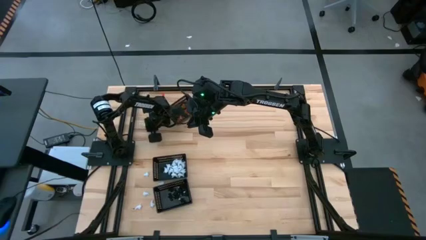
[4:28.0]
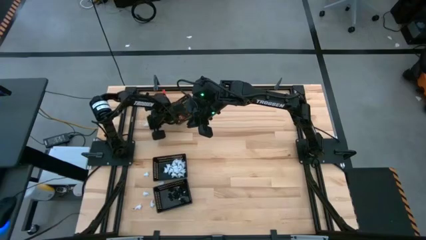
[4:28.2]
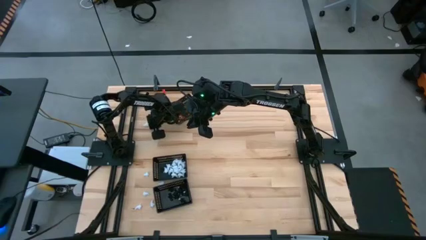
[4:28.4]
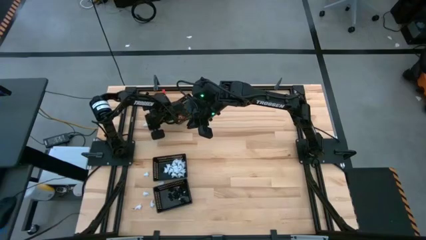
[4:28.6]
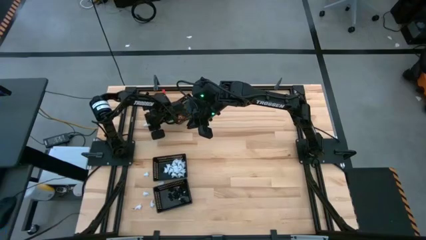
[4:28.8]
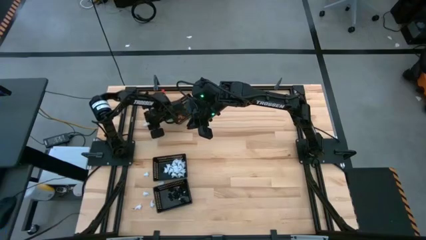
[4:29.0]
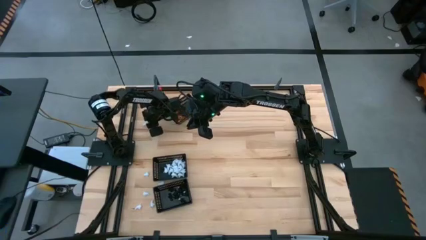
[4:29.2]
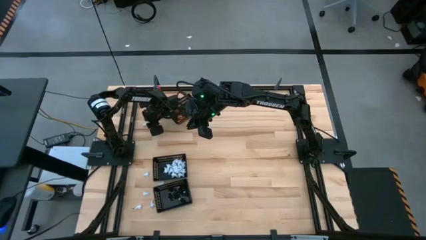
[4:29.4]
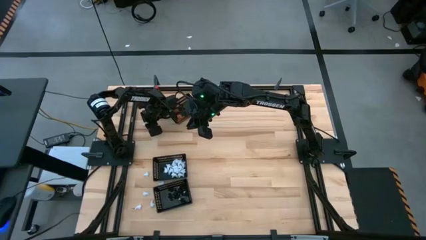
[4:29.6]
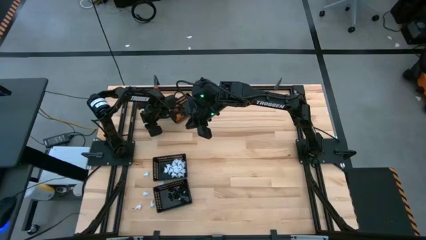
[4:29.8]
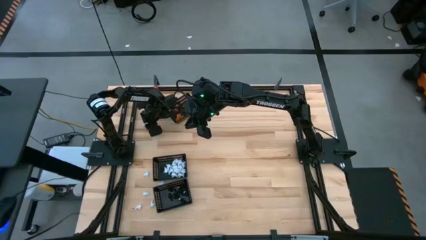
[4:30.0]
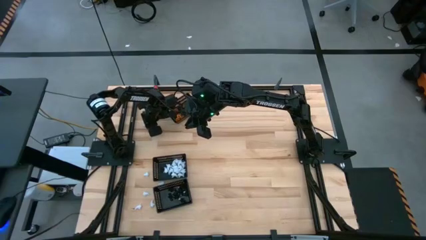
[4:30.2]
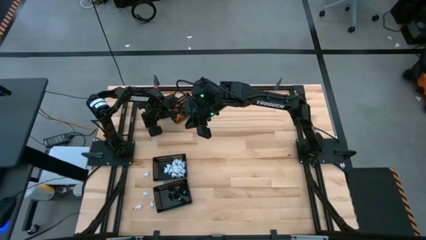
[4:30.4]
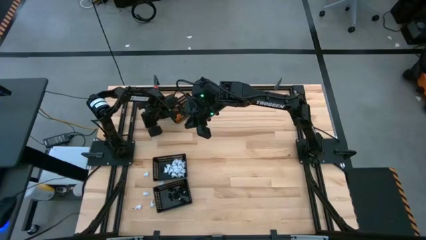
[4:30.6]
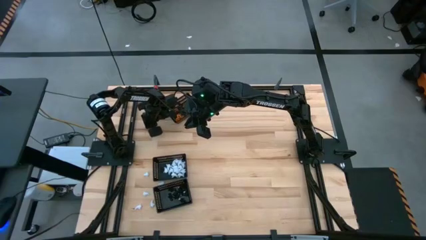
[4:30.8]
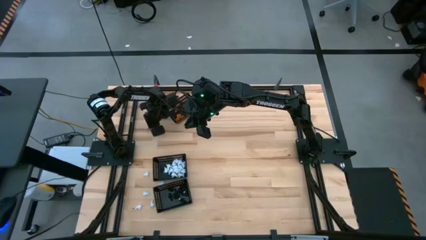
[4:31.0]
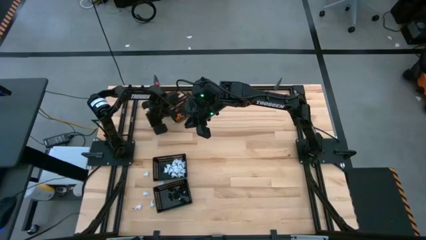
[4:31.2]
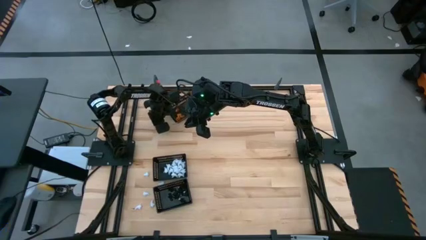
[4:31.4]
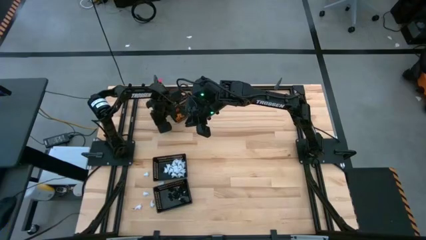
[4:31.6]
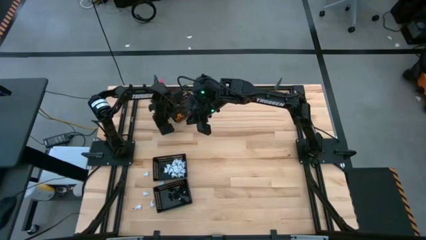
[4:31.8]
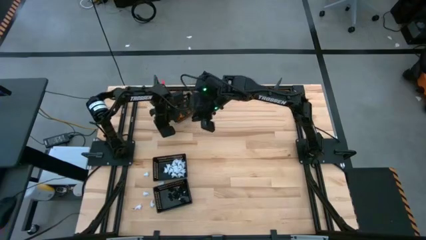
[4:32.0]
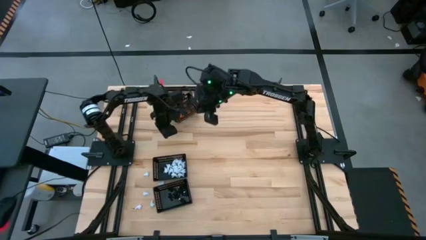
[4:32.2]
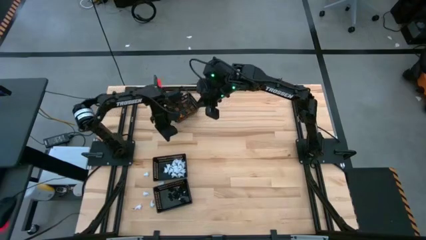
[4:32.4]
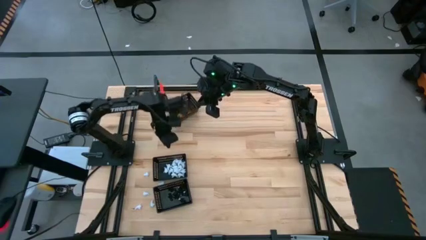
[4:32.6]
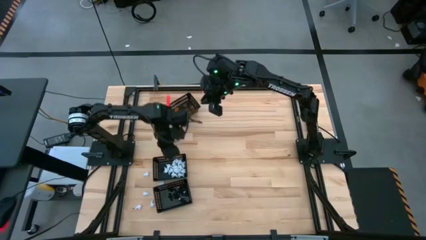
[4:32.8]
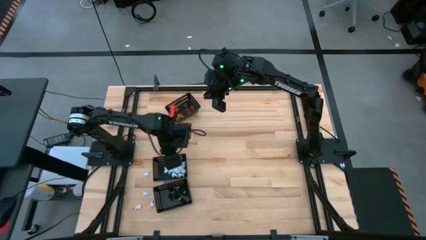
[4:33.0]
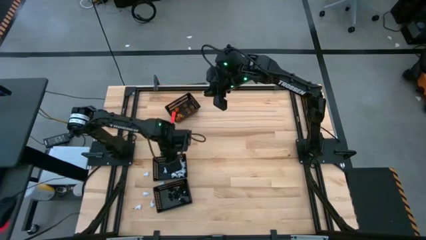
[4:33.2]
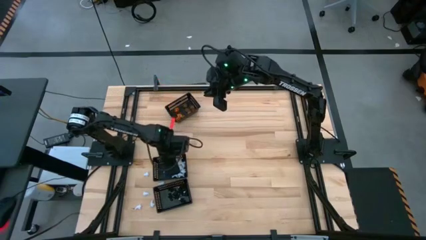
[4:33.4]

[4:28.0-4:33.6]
Task: Sort Halloween decoration
Put the white toy into the middle black bin

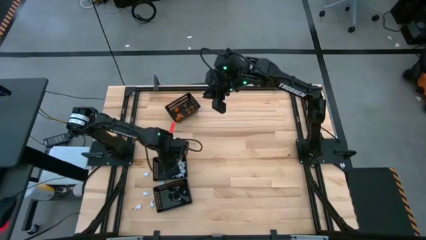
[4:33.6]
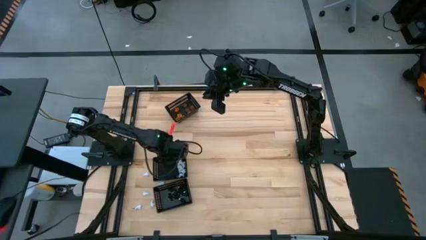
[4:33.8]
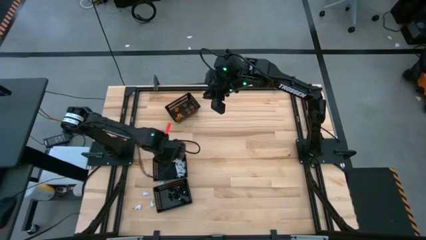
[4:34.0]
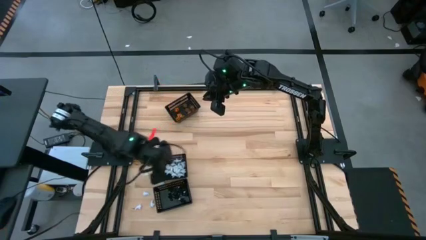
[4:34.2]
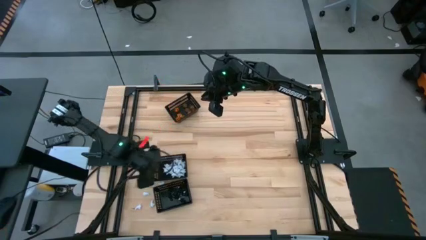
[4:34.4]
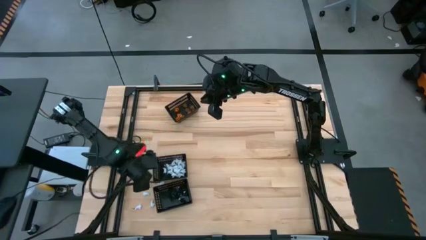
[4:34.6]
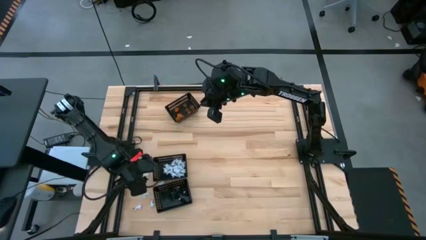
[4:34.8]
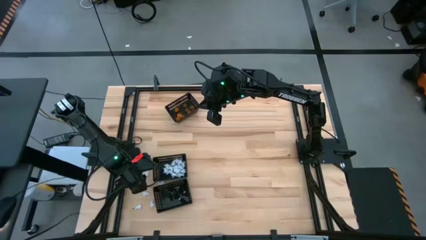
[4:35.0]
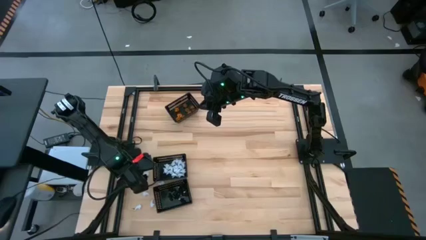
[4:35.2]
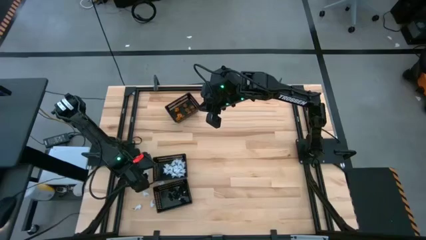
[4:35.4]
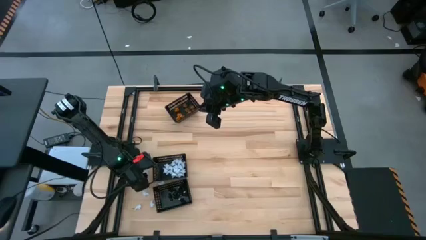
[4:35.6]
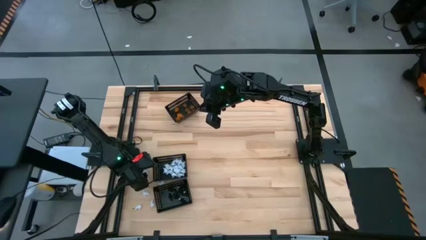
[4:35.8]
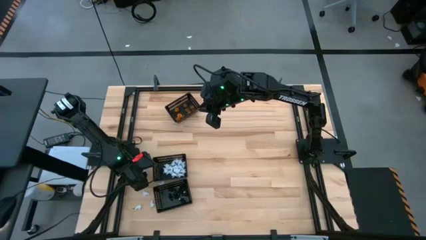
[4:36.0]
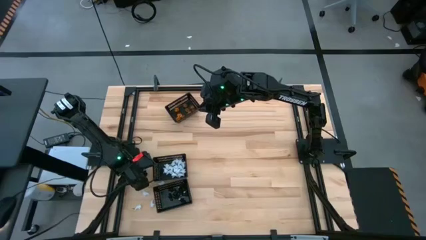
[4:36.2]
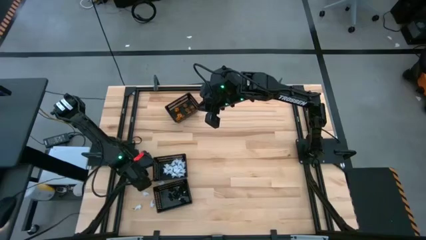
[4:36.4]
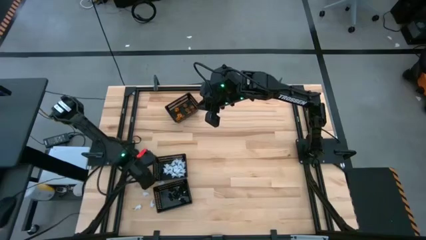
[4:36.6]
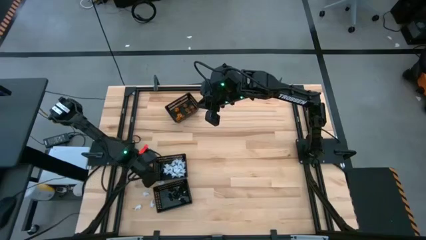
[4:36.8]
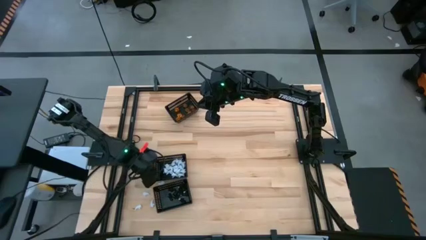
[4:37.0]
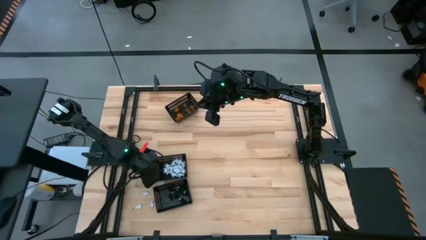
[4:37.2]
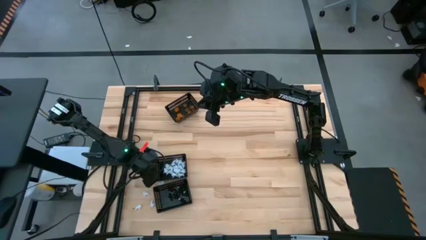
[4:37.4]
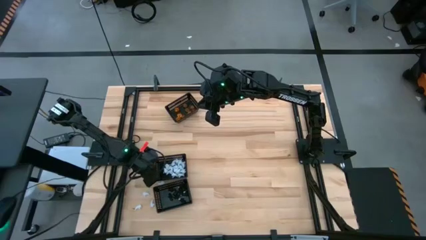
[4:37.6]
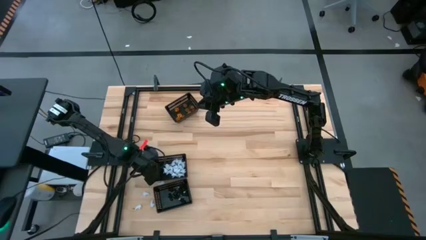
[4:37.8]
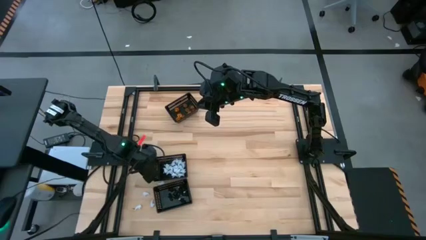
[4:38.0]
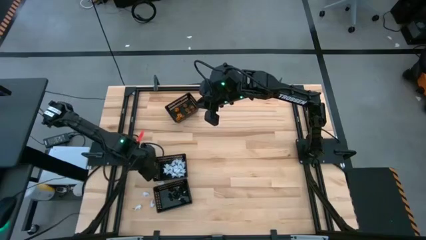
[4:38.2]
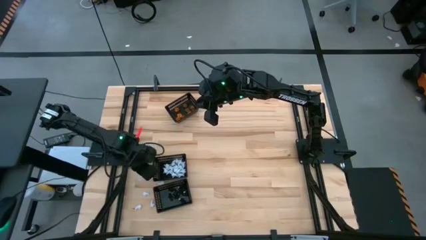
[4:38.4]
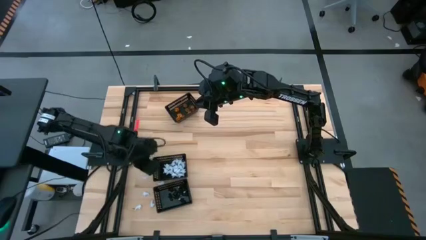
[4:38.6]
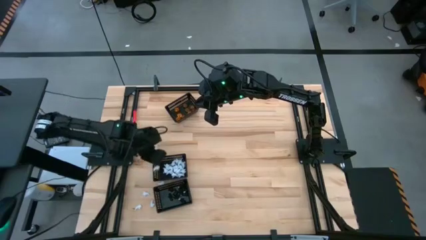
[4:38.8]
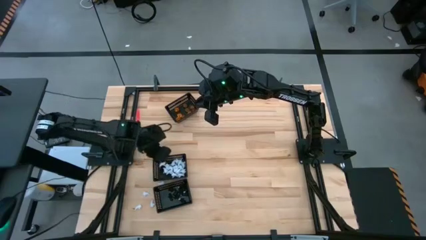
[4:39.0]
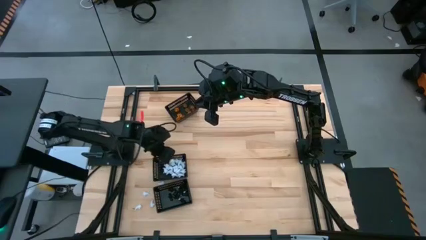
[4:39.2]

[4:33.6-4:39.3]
Put the white toy into the middle black bin

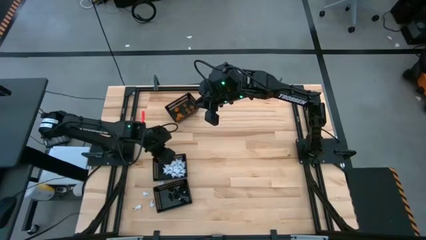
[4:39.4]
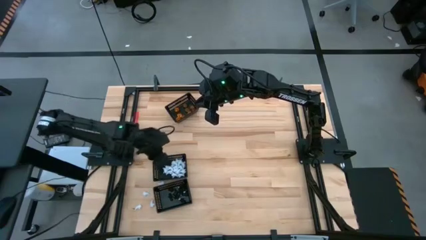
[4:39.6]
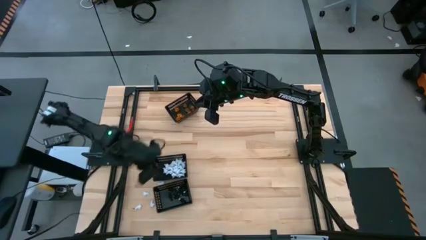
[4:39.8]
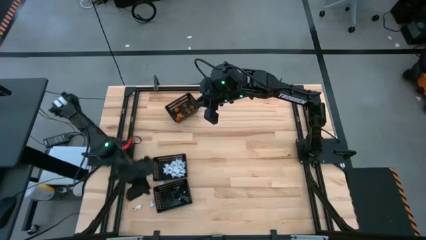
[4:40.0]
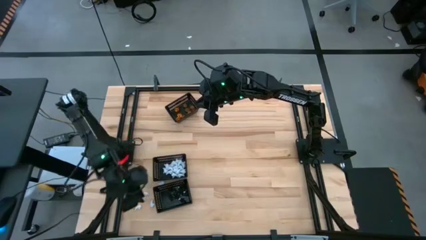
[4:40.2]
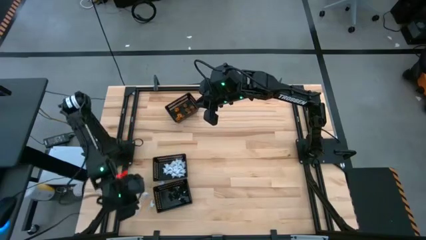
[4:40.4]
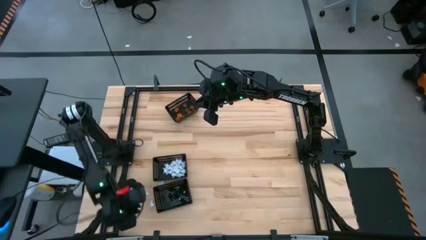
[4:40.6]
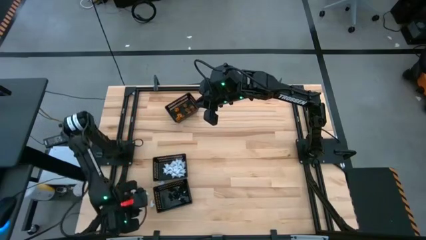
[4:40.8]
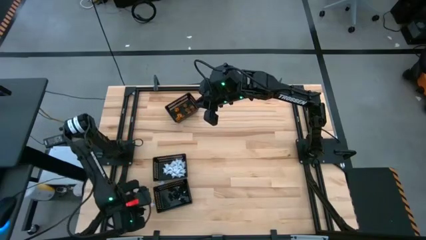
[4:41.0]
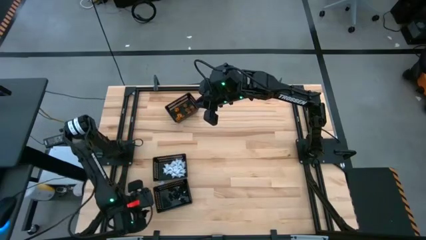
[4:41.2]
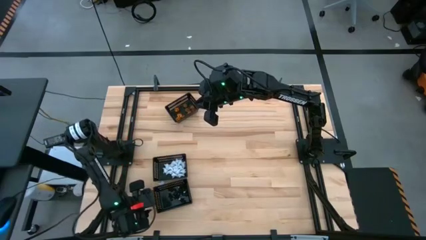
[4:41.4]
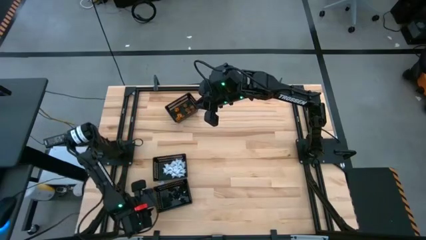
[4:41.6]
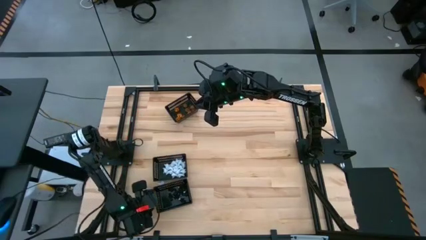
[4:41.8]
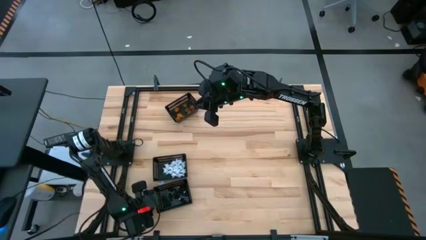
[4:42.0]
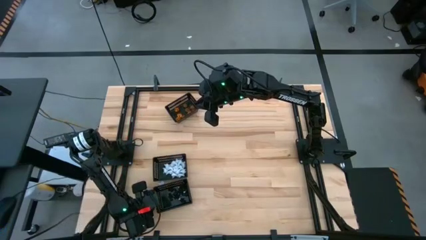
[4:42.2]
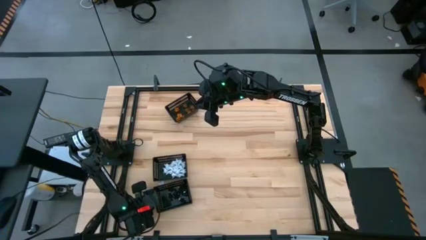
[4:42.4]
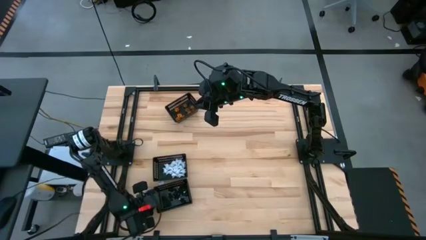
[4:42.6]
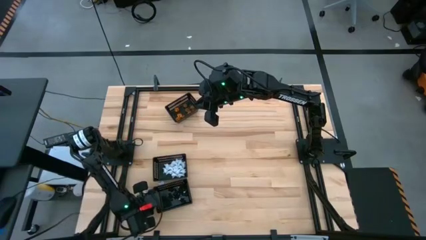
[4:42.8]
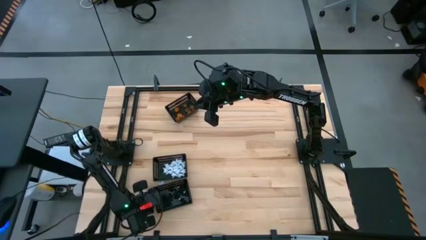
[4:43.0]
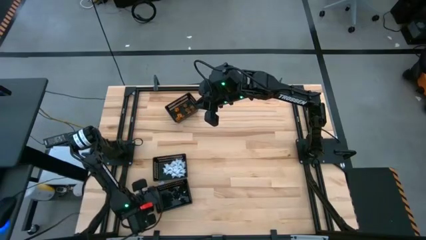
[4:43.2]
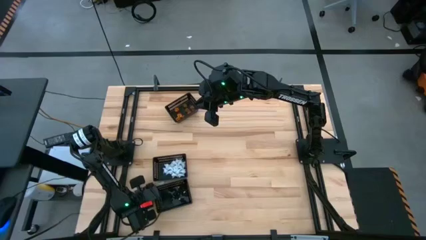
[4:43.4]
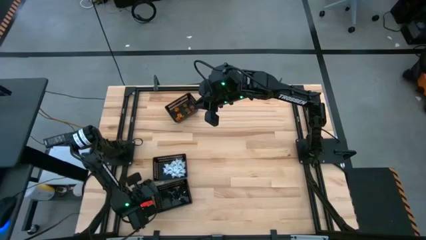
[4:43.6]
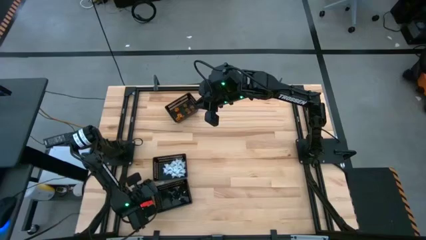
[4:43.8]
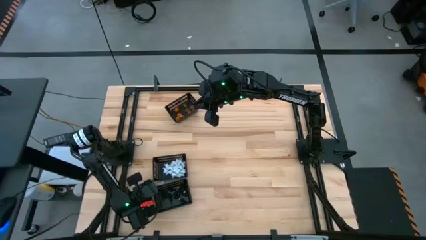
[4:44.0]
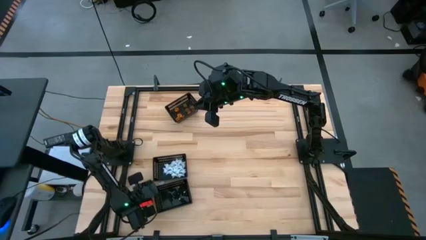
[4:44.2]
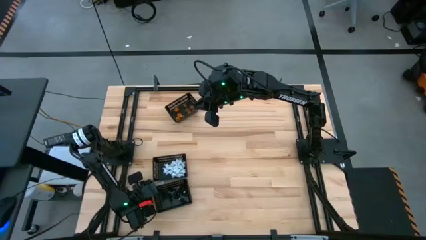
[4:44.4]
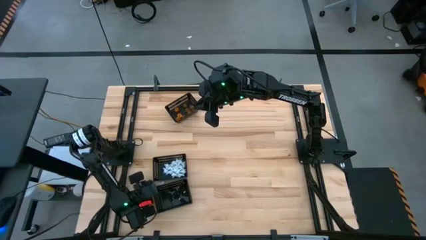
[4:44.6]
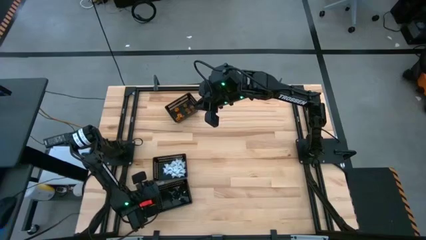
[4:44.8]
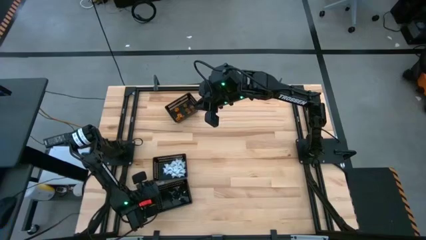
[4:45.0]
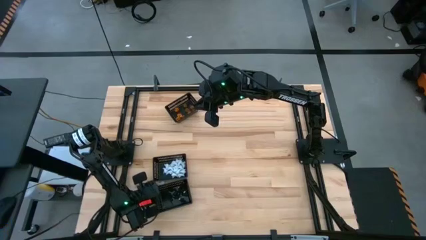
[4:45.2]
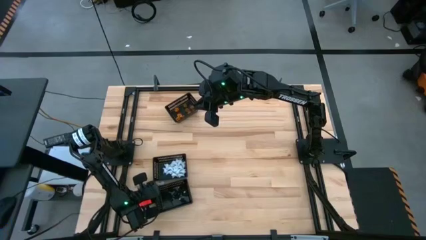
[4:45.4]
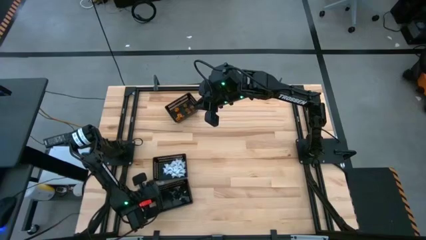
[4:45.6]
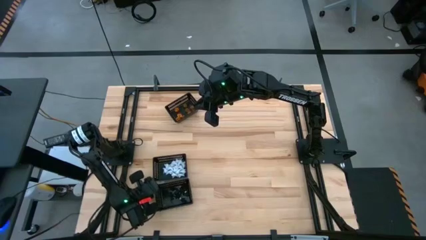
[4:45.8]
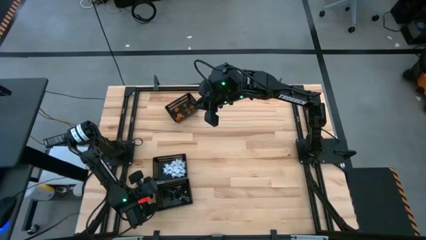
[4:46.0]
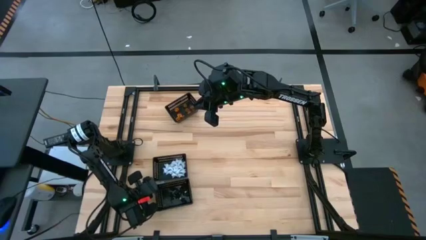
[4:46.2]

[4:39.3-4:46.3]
Put the white toy into the middle black bin
